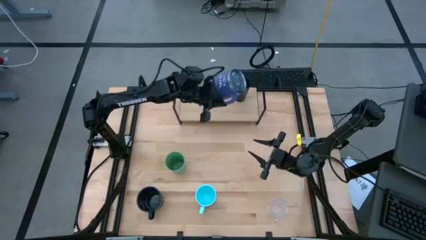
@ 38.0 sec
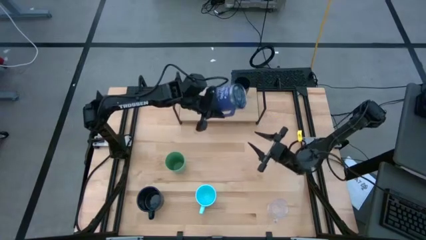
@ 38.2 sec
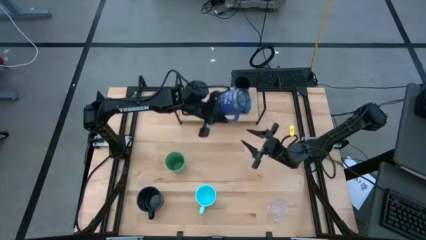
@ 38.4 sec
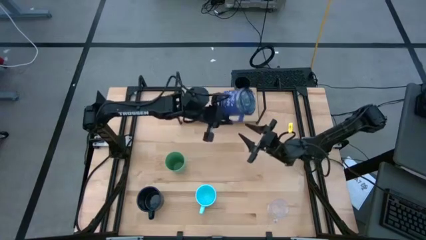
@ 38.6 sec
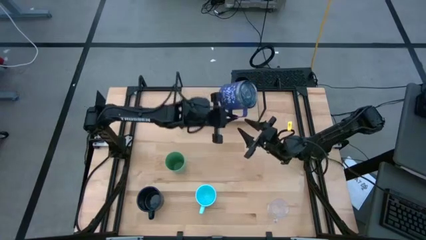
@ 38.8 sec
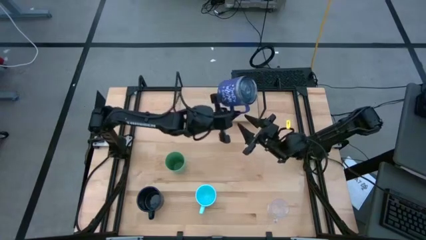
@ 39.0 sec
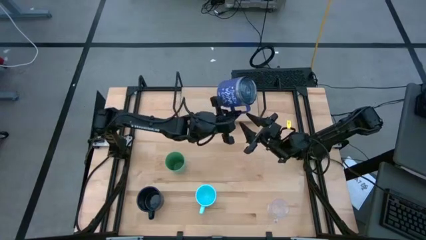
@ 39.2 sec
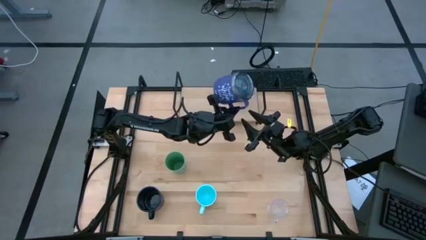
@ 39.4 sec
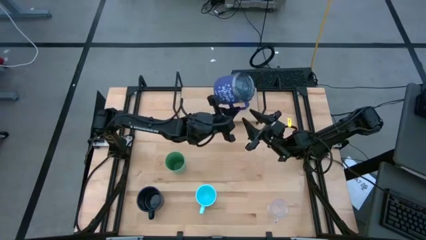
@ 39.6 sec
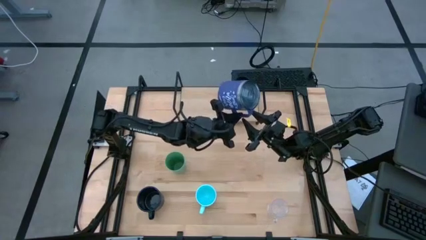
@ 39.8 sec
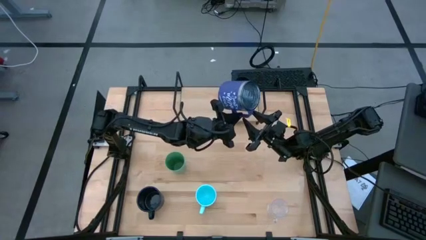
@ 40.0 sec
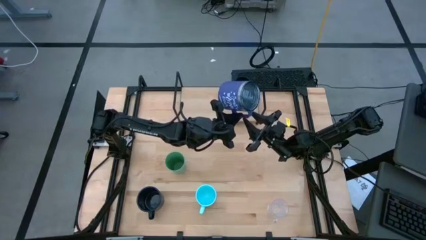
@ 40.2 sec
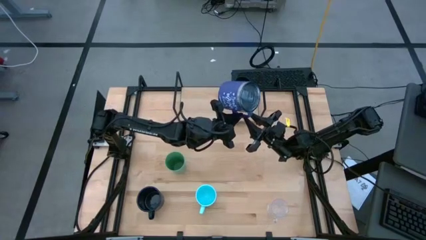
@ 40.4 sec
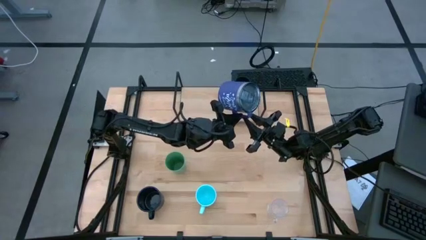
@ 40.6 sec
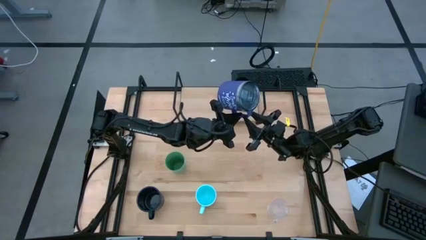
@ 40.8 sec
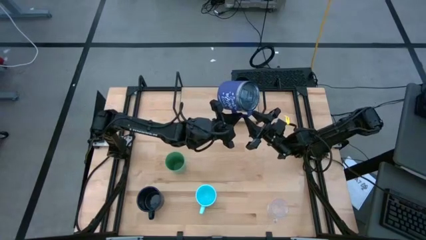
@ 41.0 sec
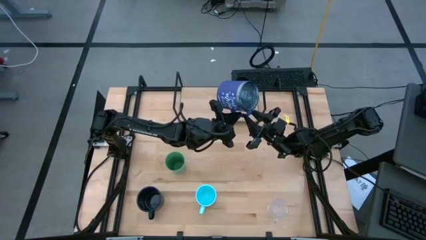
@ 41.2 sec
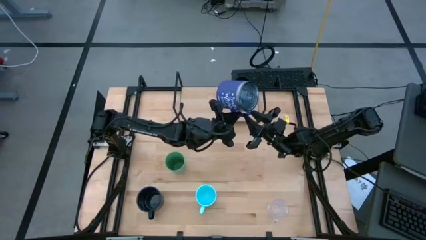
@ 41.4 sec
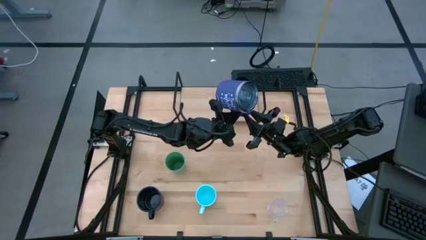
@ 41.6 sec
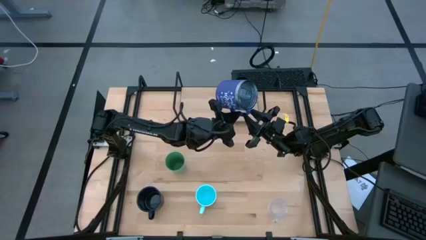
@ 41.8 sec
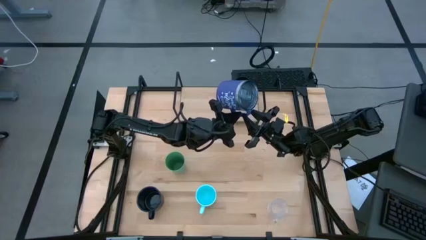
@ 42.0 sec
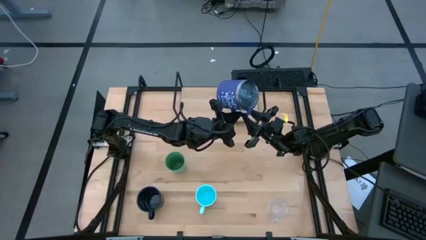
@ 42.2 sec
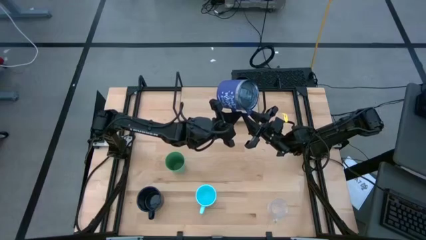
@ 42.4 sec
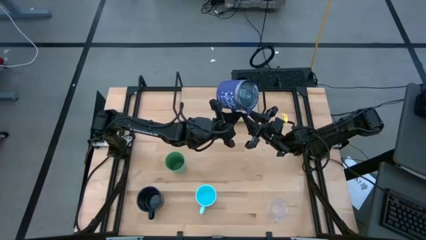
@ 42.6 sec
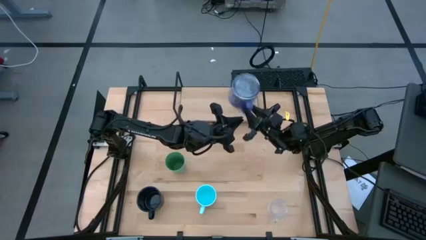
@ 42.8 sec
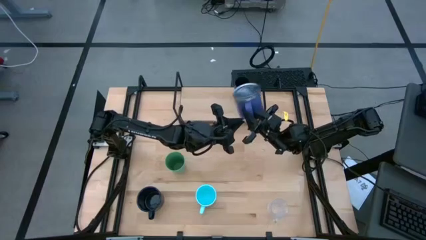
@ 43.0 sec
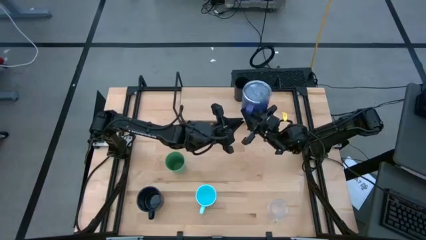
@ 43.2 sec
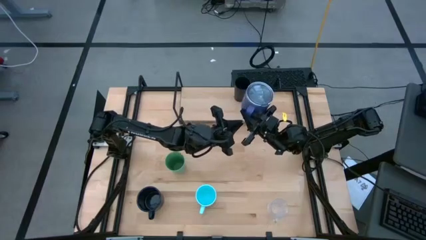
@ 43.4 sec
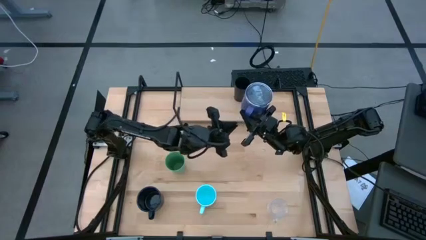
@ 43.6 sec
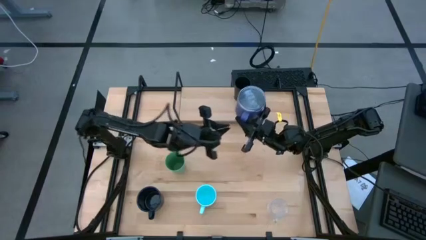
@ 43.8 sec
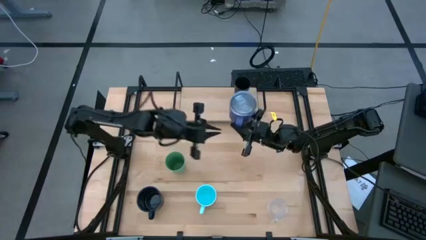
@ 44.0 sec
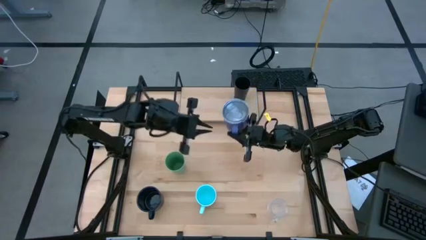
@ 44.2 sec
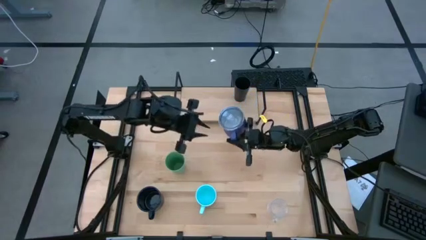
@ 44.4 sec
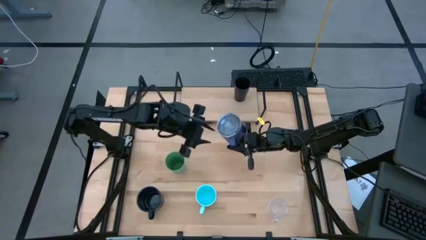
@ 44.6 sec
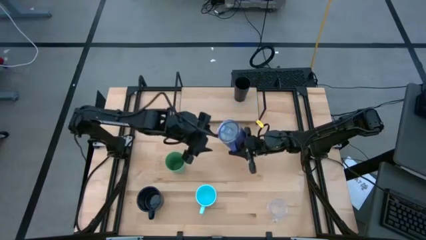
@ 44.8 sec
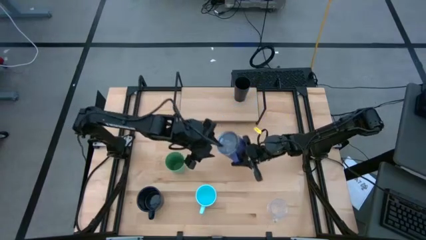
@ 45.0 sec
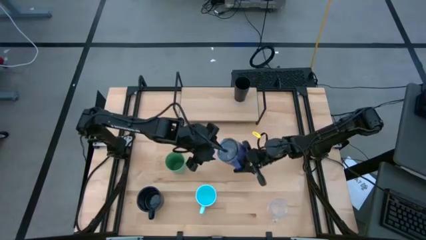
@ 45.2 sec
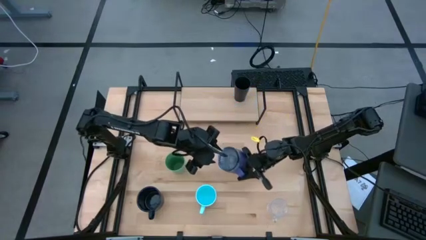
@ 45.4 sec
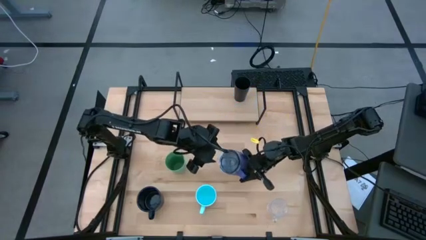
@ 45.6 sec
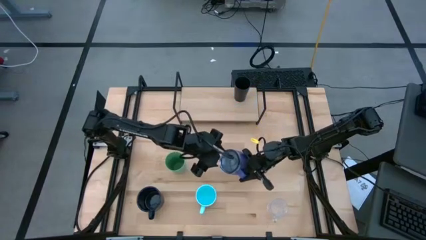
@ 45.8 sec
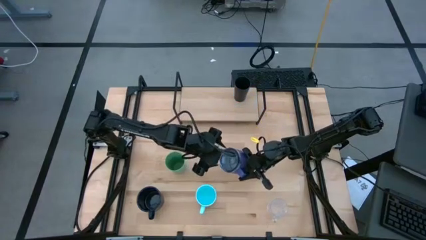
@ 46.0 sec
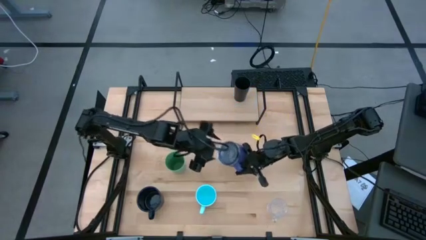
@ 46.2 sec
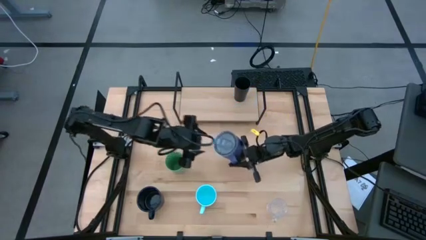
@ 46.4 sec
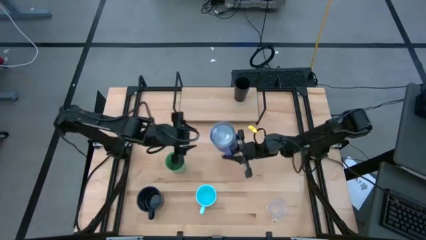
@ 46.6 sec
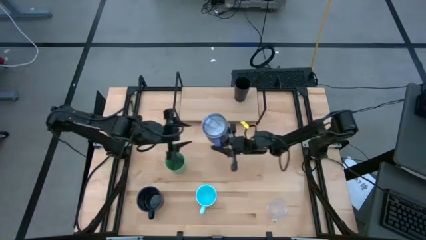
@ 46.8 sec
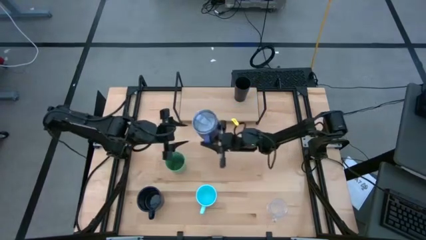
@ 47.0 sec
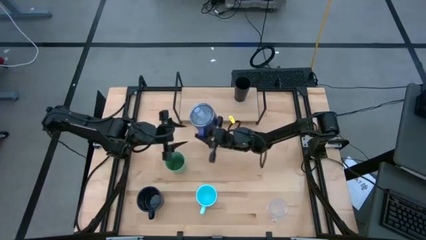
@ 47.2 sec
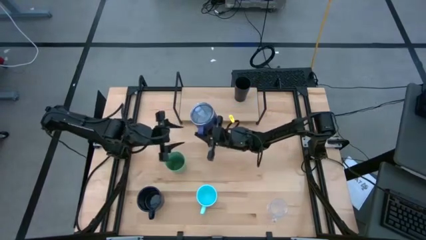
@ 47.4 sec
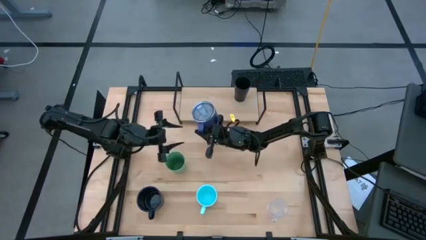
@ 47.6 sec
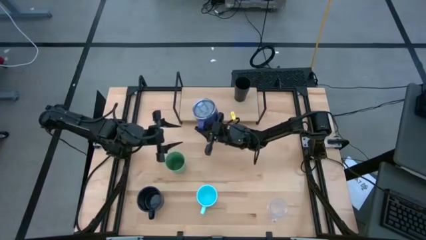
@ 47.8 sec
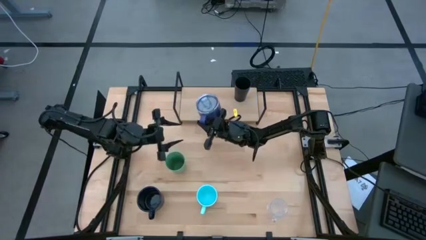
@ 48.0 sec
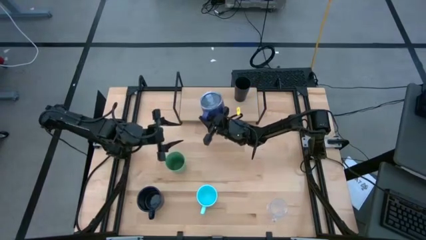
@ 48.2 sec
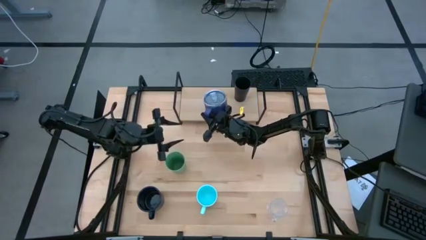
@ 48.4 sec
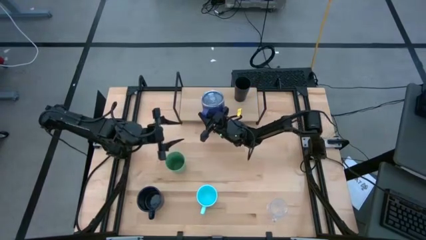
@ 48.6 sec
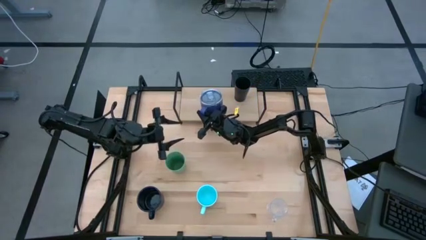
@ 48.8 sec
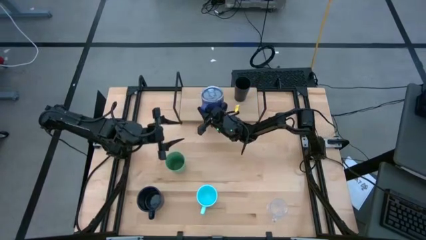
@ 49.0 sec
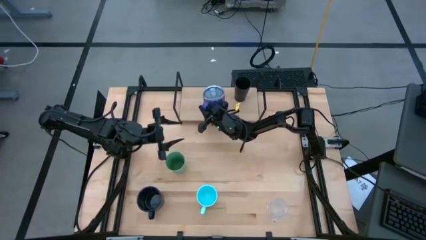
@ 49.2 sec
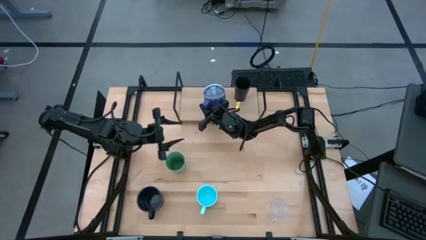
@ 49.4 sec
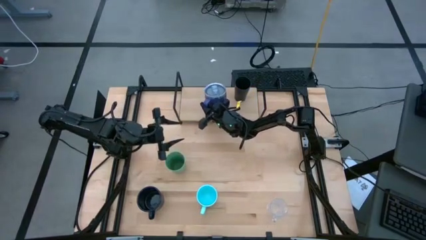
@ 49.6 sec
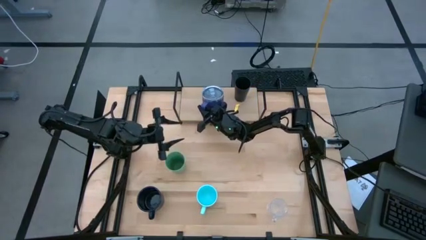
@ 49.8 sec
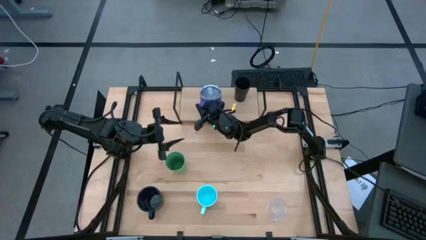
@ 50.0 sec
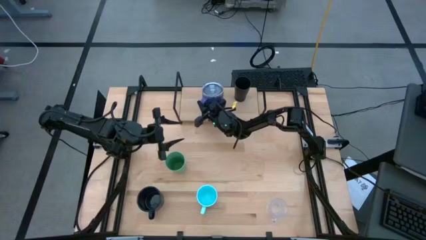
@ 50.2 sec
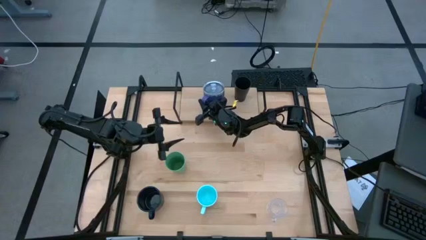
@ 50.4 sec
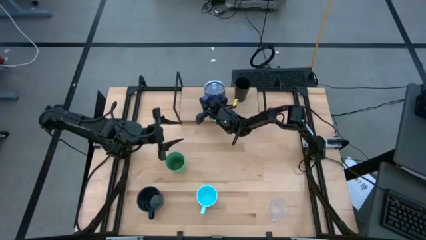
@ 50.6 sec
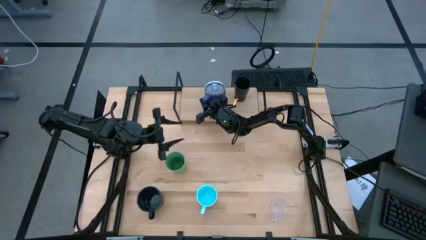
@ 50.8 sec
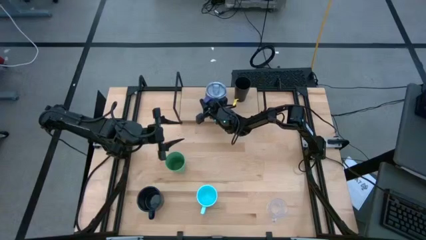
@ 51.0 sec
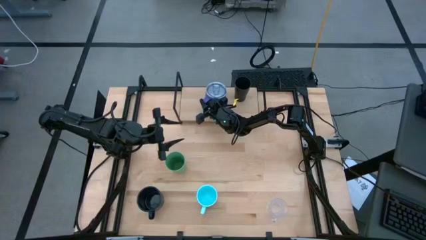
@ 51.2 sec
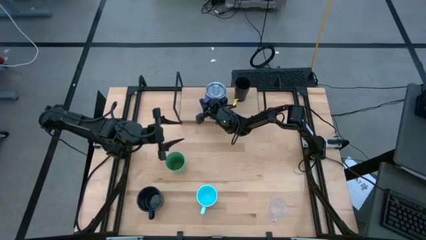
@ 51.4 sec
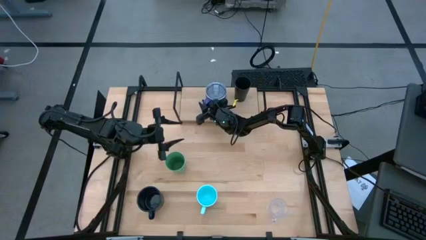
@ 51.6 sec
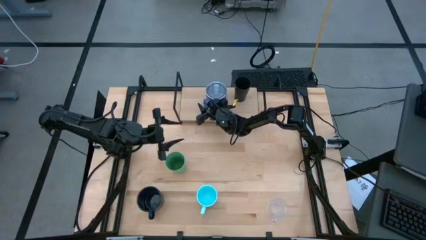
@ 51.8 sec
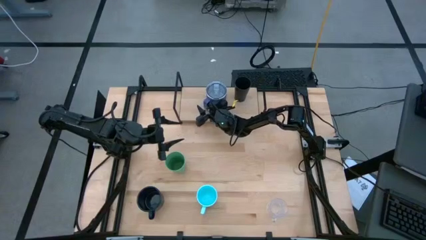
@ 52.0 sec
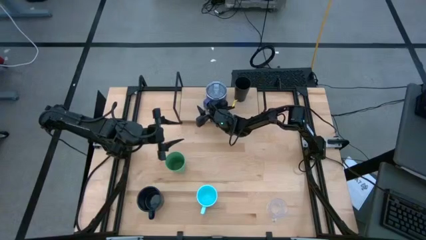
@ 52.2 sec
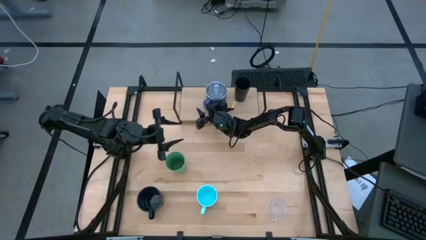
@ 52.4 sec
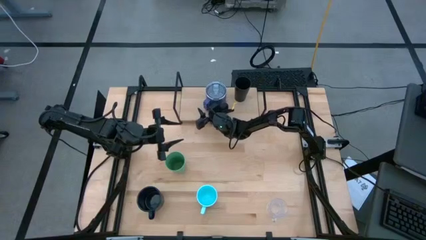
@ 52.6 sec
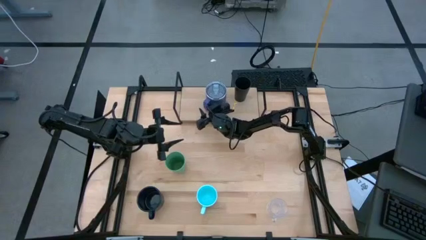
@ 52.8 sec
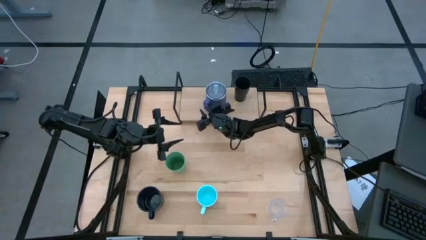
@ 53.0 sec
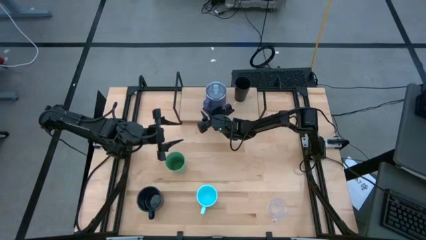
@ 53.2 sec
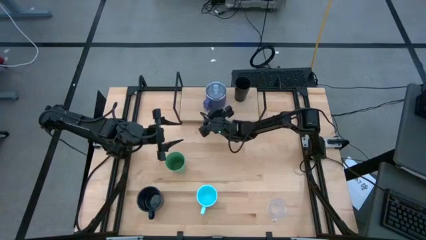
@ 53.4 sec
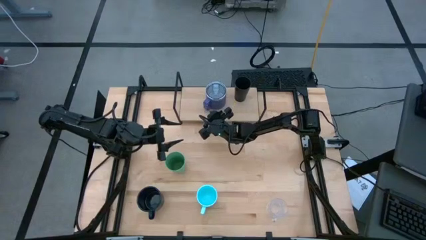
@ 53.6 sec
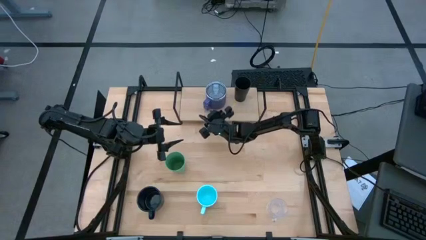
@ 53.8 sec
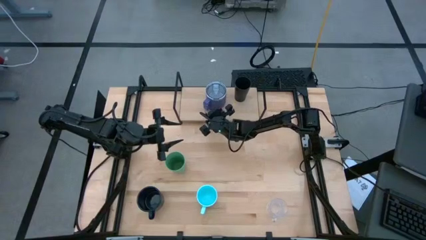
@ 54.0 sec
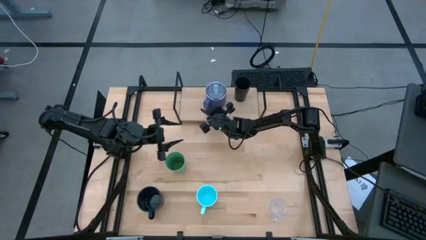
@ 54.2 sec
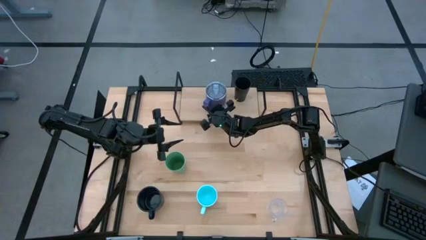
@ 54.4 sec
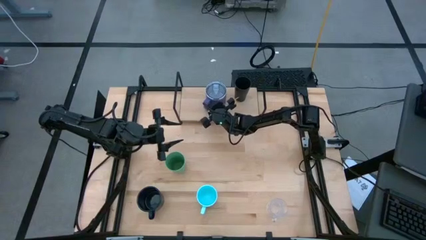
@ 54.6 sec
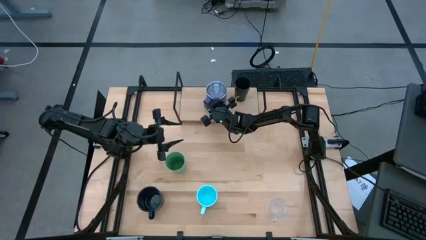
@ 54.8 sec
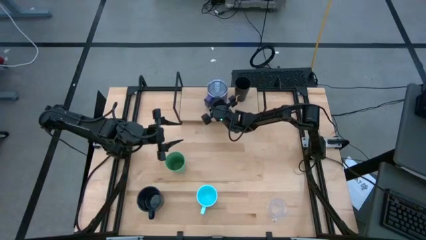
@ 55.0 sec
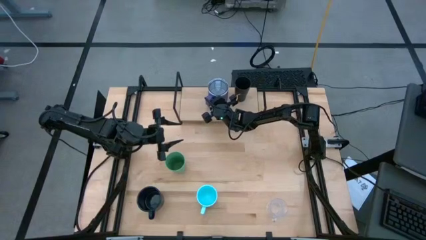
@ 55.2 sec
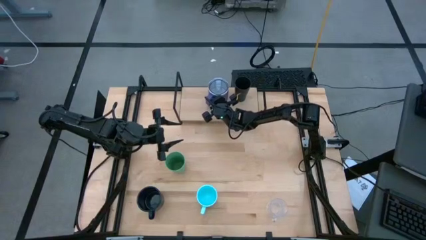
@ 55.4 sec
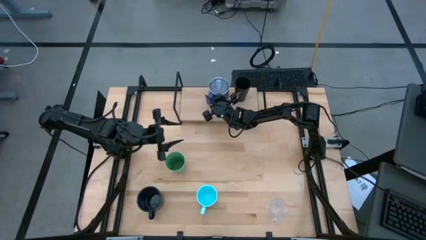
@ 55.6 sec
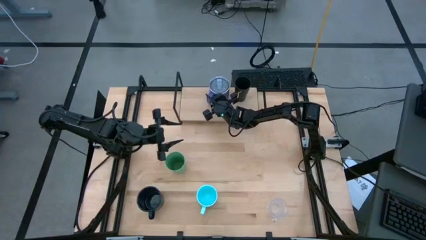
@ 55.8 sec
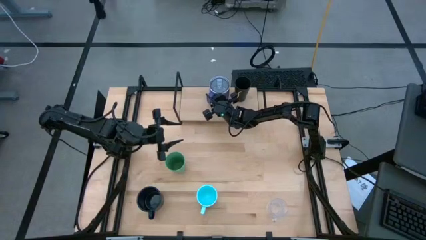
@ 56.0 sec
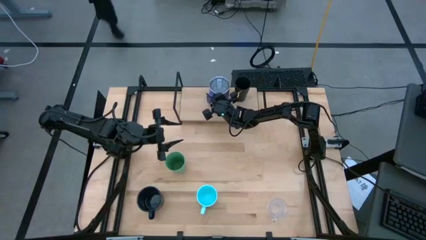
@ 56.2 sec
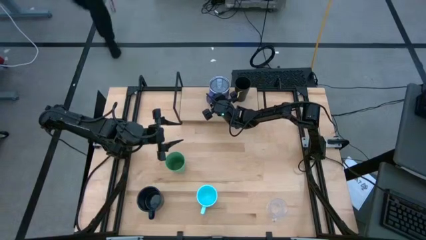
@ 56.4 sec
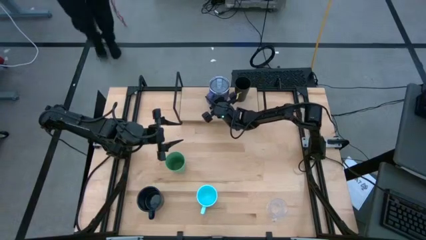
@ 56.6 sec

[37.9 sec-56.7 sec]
Task: Stack small to large cups/mugs on shelf
Put the purple mug on the shelf
